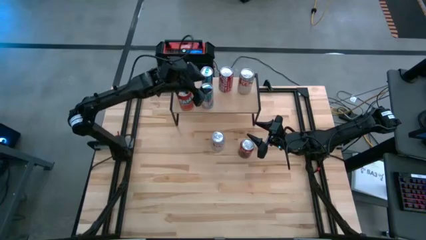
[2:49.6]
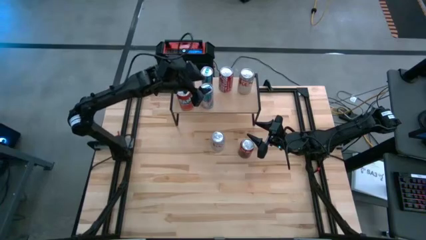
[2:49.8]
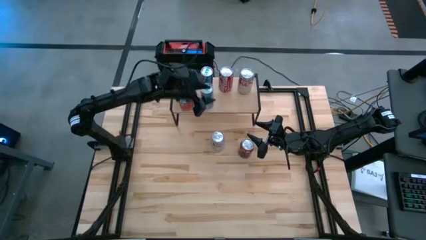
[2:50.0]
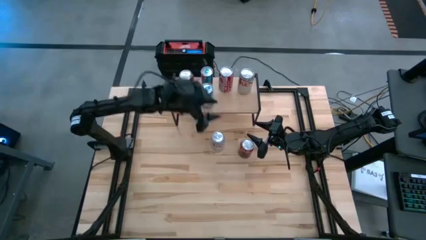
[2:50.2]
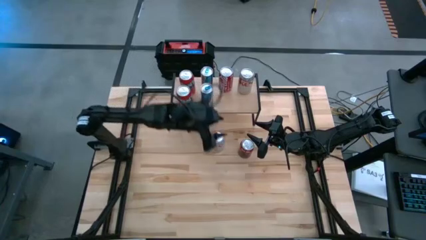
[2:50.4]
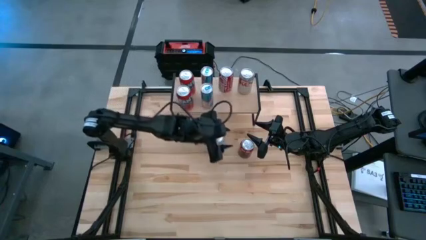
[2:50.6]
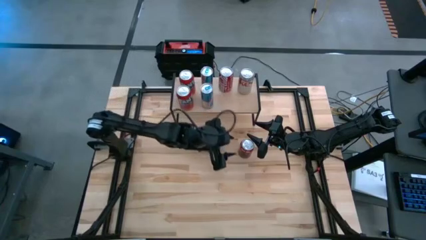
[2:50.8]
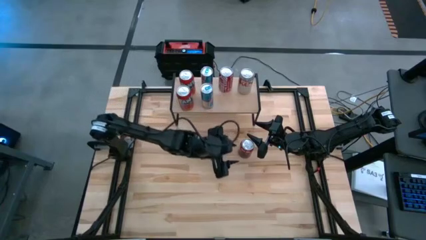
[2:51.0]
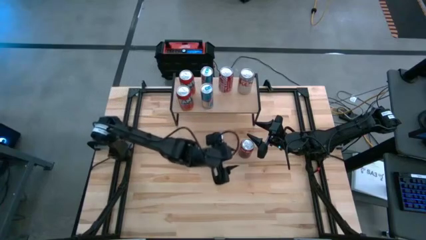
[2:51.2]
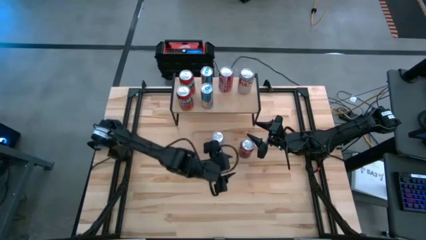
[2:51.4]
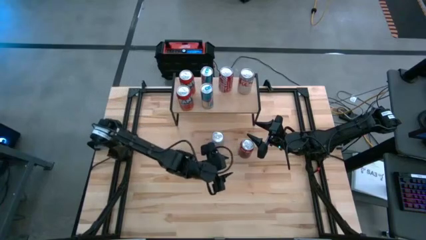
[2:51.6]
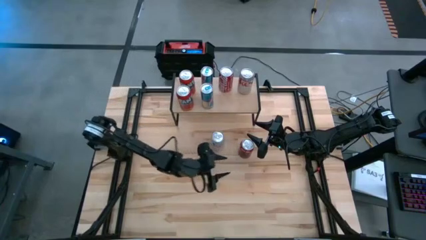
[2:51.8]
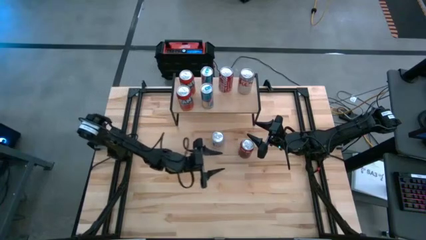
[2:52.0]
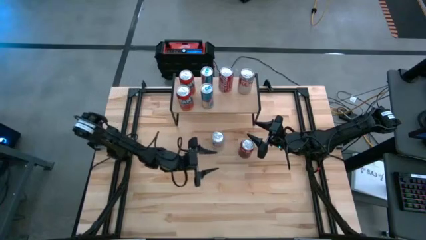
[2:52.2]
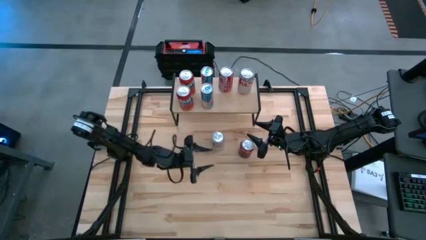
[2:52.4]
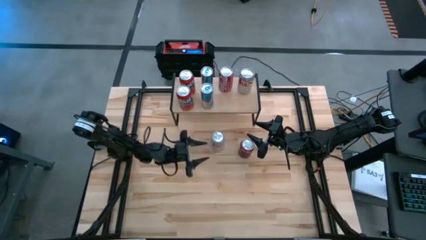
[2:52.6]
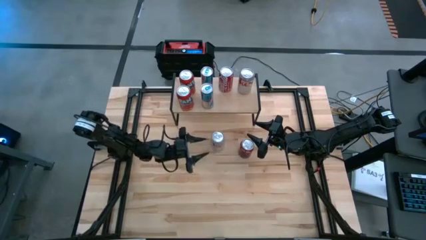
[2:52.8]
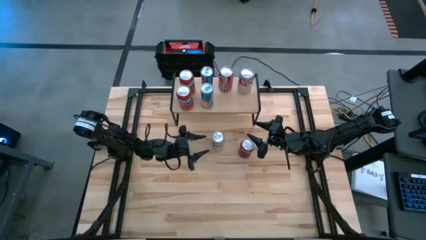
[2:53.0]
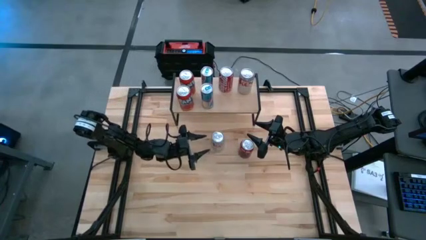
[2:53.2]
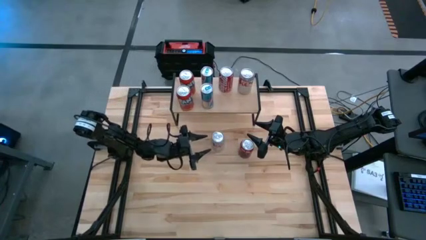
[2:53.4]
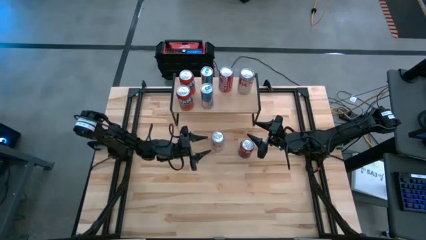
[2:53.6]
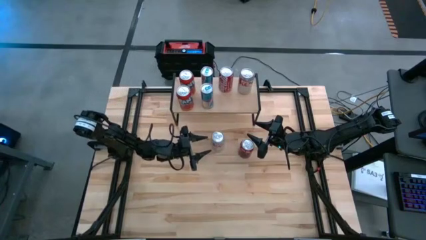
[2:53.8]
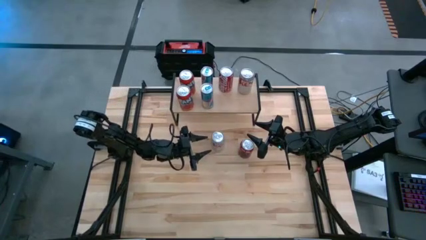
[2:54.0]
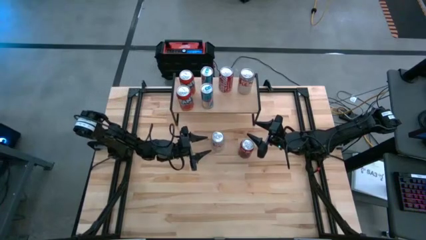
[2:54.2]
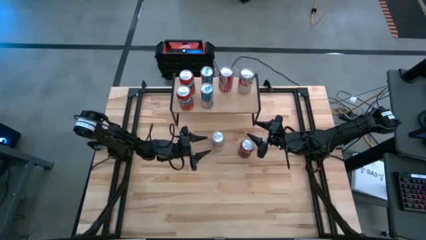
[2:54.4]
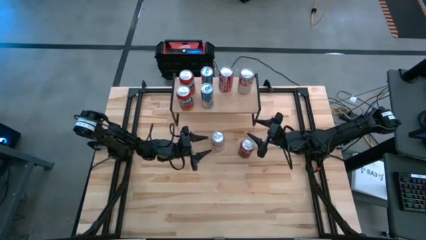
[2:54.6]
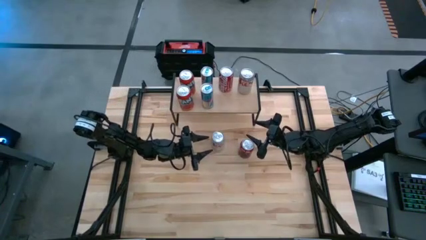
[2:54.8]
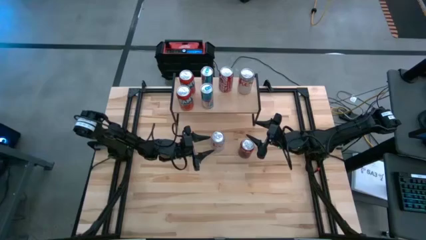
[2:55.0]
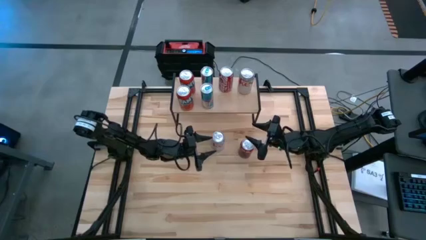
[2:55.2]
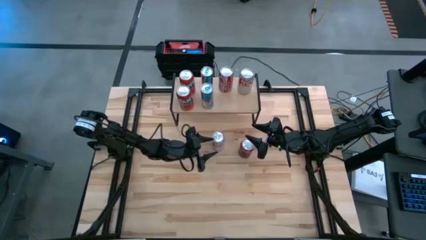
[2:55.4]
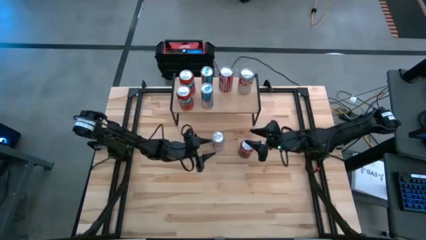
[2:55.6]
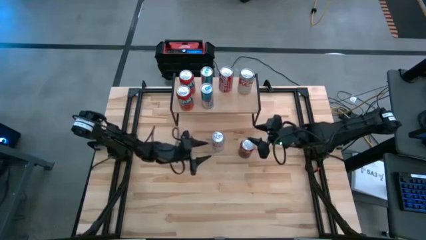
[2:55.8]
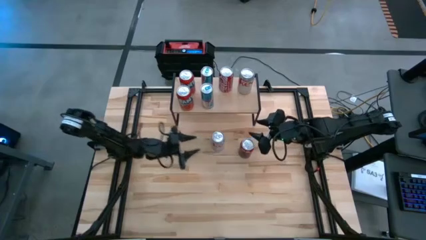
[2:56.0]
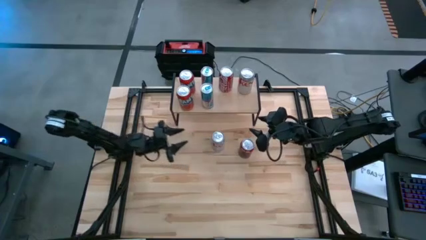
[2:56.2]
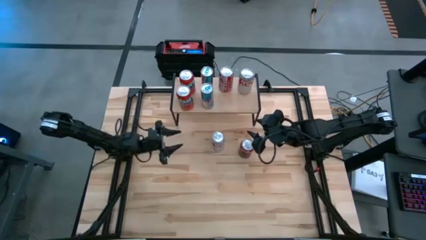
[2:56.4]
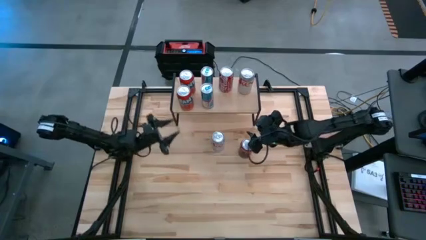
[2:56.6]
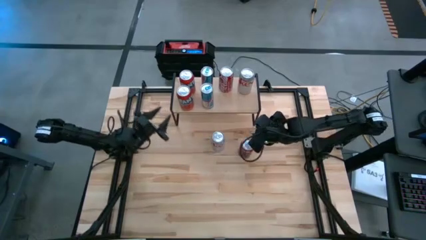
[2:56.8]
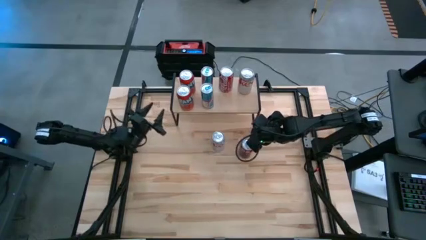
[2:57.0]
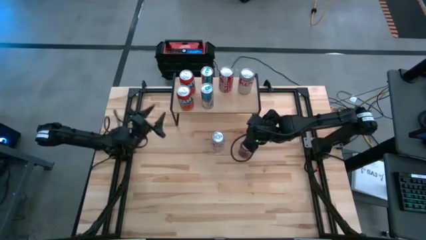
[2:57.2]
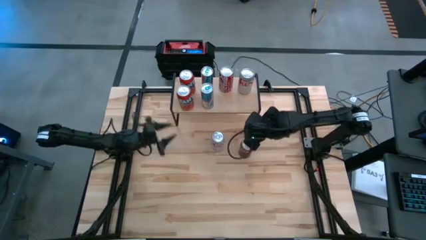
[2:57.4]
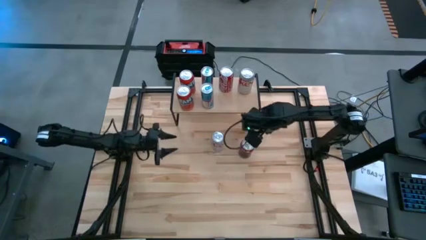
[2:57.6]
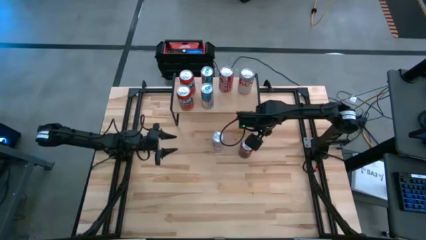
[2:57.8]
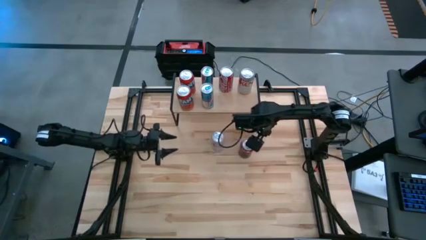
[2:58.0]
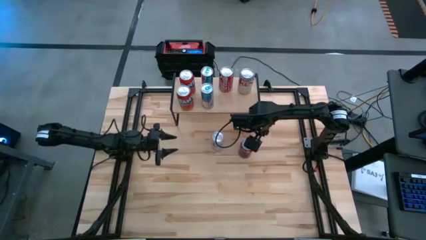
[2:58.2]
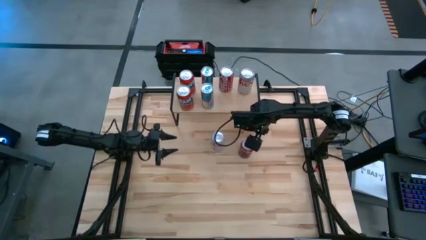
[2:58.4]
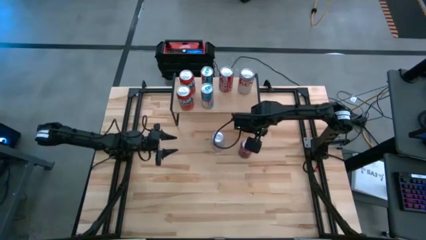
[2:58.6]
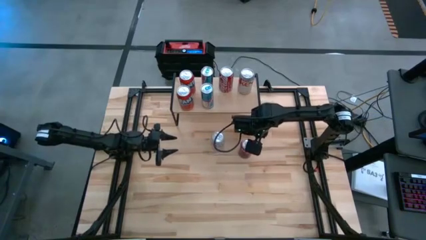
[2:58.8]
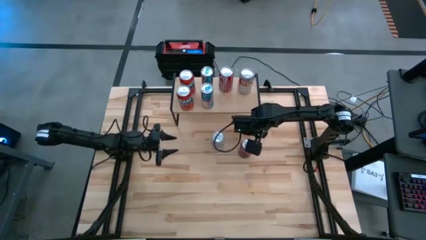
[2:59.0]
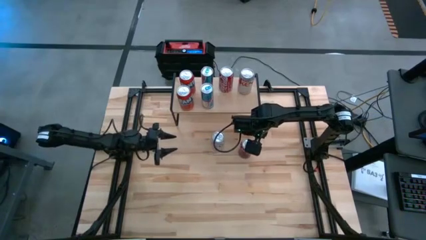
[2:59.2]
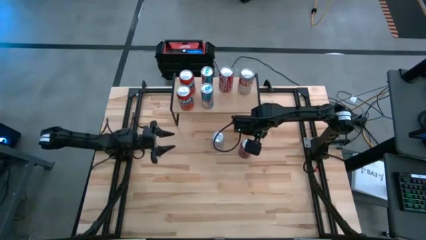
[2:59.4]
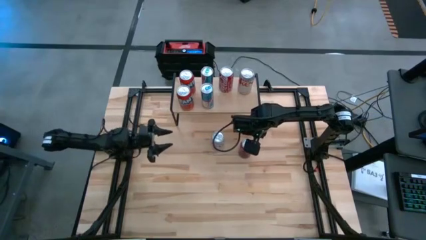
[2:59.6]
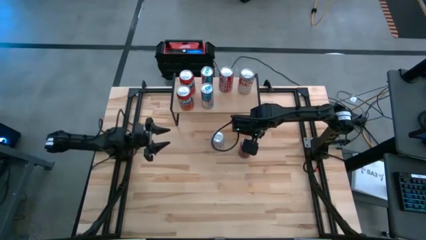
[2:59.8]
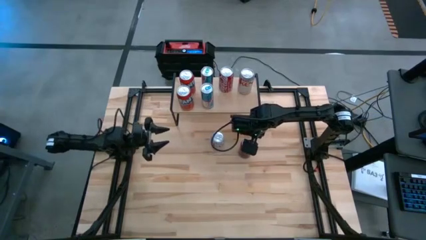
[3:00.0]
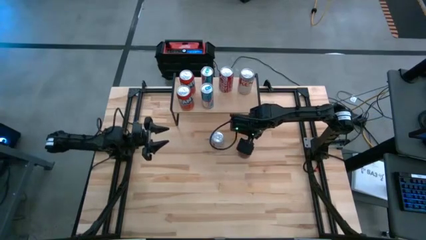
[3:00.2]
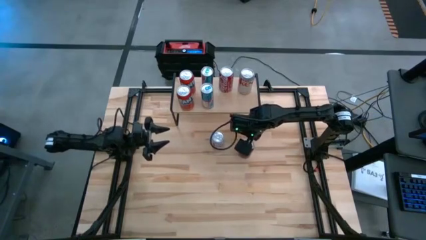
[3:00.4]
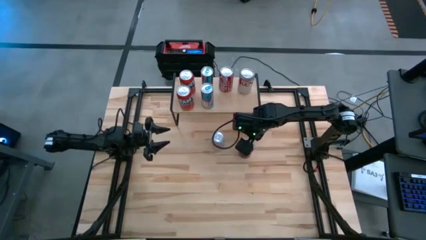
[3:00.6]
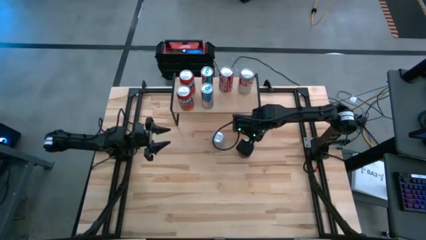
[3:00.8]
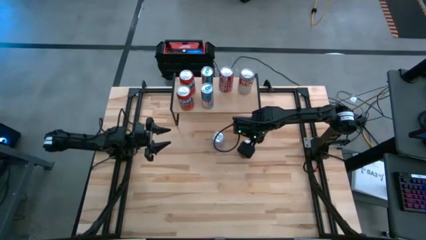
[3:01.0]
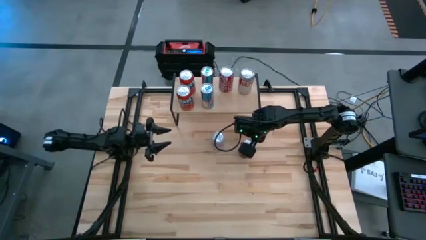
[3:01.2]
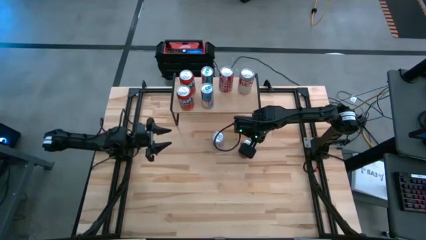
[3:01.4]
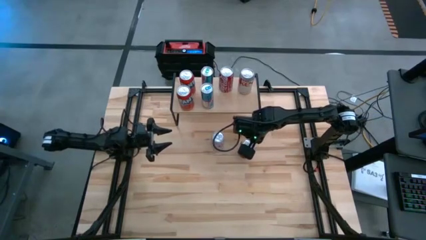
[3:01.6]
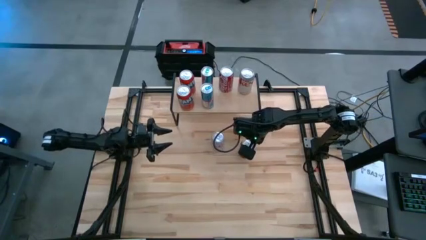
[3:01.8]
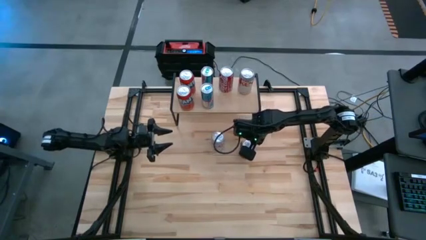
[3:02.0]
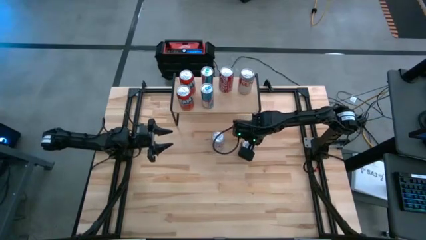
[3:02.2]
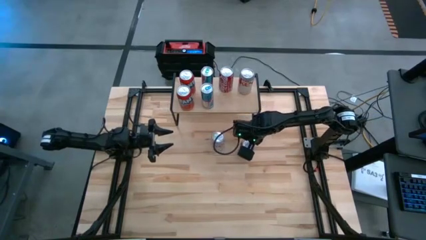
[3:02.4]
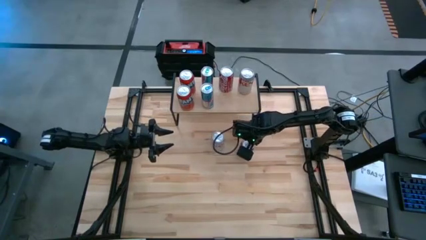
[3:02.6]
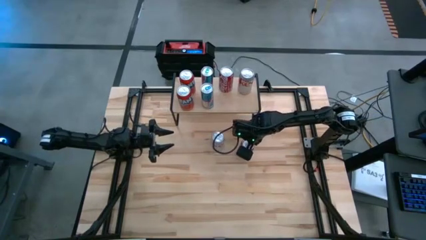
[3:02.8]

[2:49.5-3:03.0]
Task: Place canned beverage on shelf
Put the red and white soda can on the shelf aligned with the other red and white soda can
